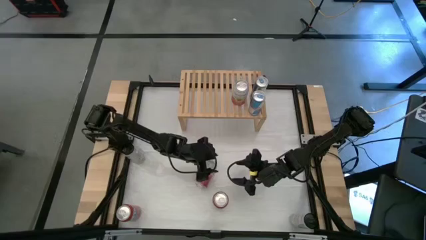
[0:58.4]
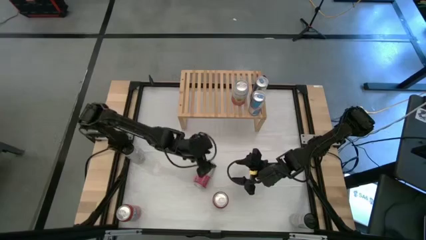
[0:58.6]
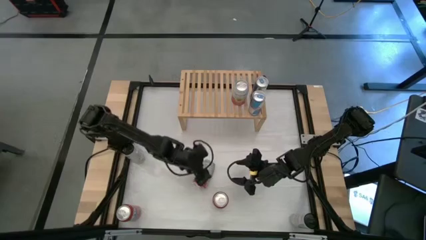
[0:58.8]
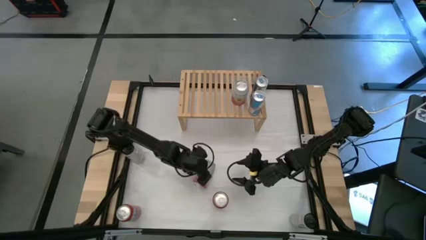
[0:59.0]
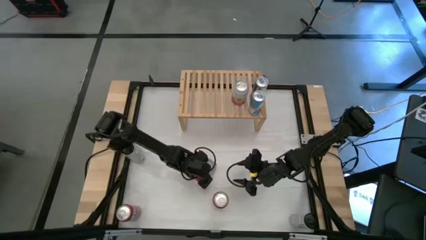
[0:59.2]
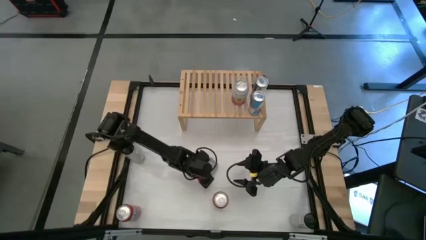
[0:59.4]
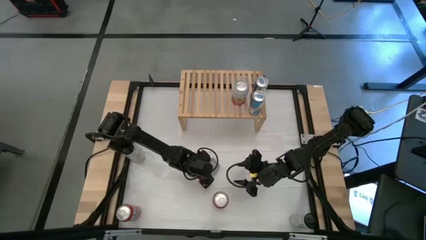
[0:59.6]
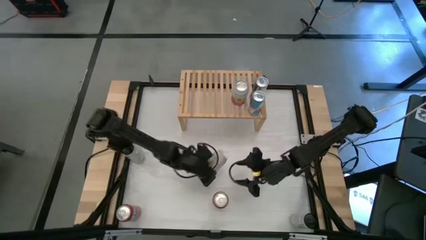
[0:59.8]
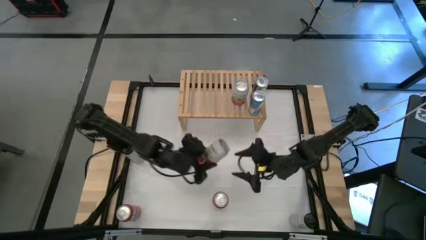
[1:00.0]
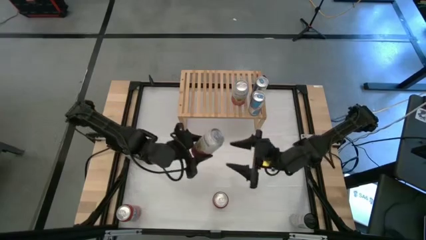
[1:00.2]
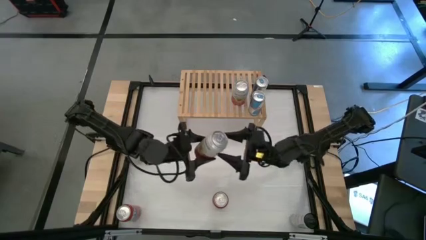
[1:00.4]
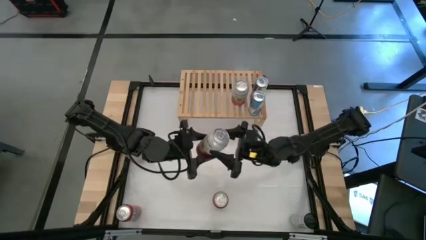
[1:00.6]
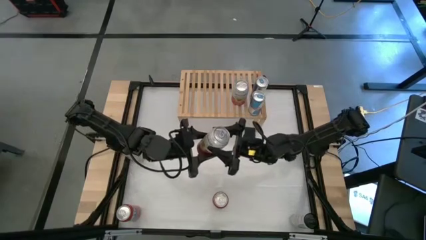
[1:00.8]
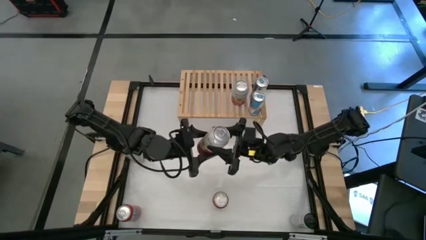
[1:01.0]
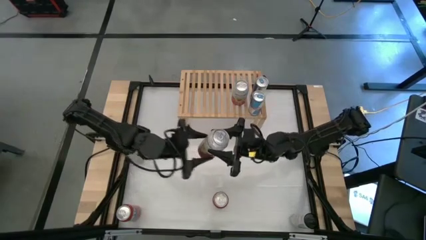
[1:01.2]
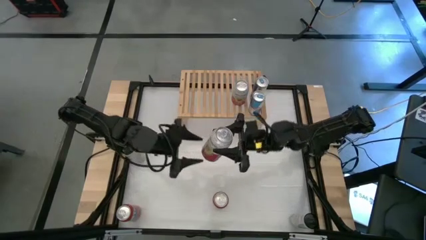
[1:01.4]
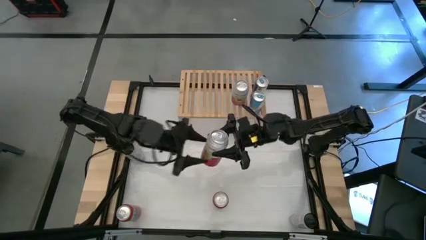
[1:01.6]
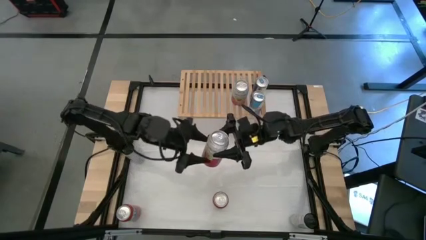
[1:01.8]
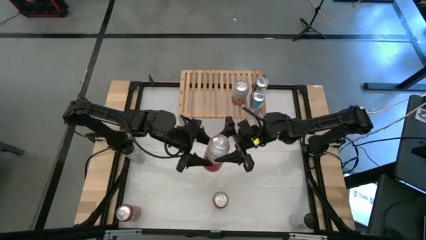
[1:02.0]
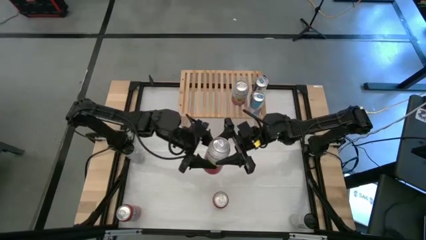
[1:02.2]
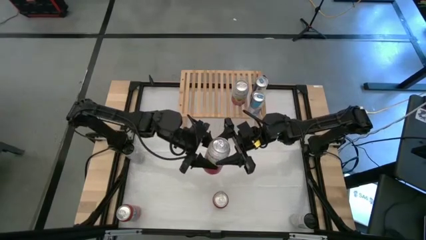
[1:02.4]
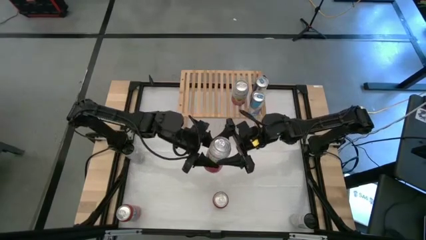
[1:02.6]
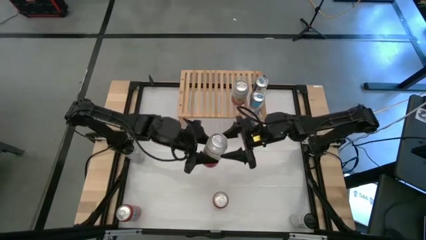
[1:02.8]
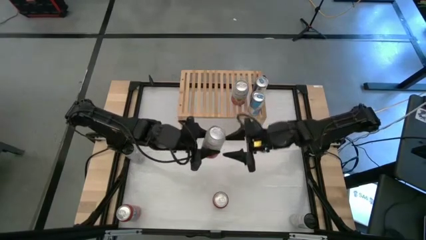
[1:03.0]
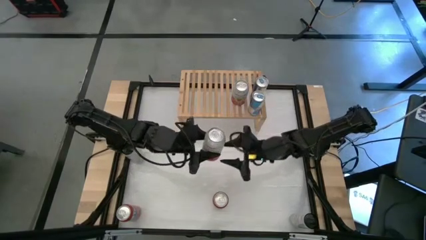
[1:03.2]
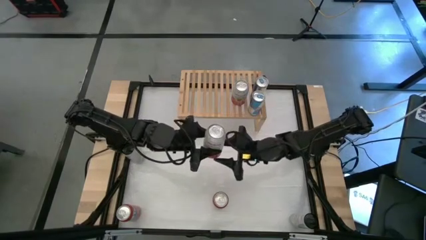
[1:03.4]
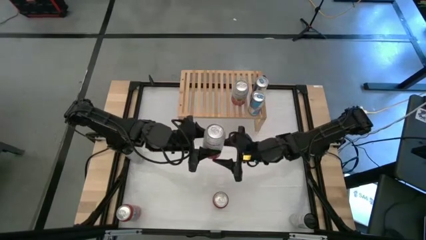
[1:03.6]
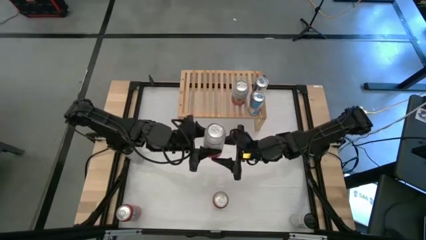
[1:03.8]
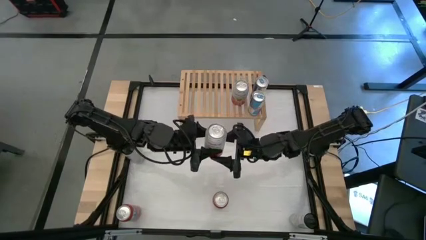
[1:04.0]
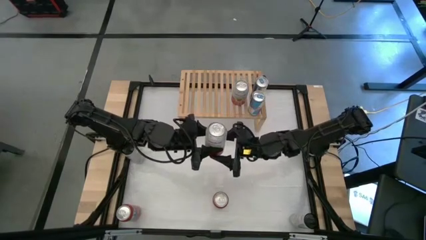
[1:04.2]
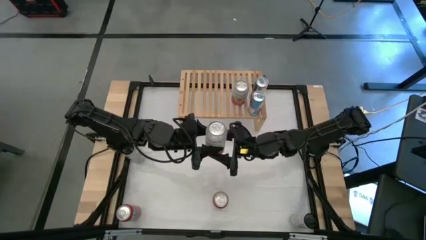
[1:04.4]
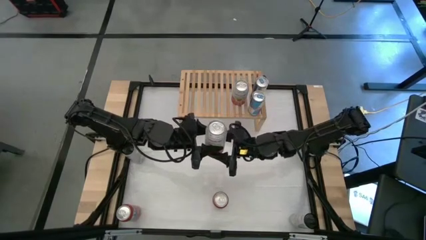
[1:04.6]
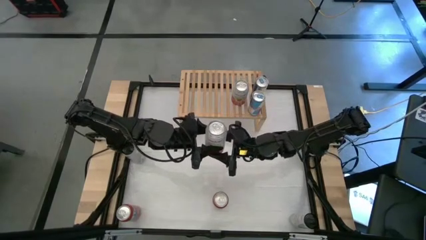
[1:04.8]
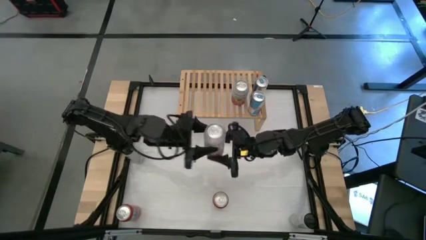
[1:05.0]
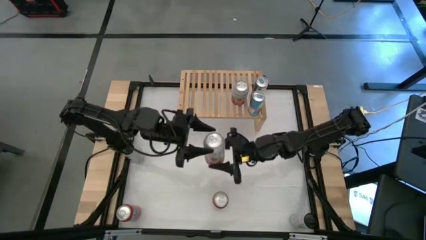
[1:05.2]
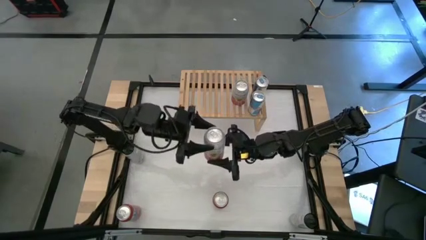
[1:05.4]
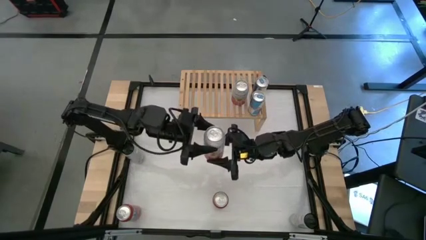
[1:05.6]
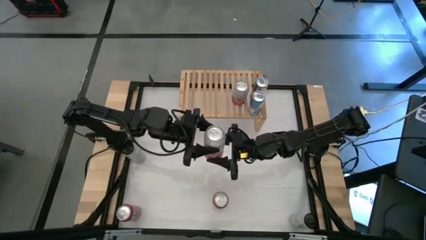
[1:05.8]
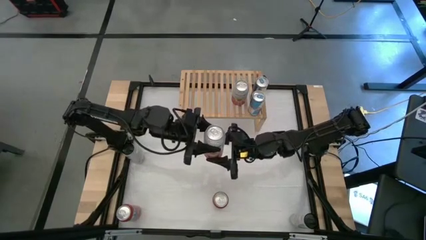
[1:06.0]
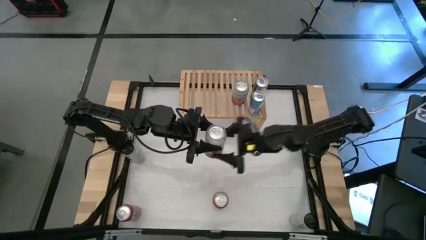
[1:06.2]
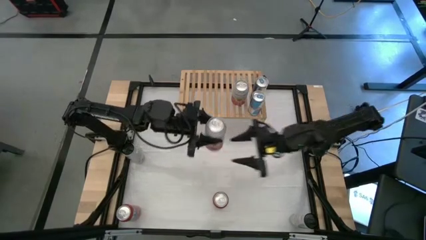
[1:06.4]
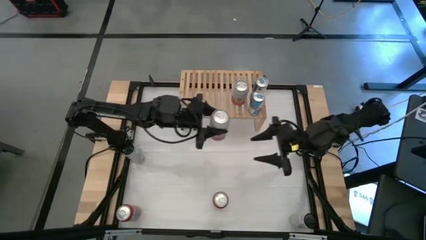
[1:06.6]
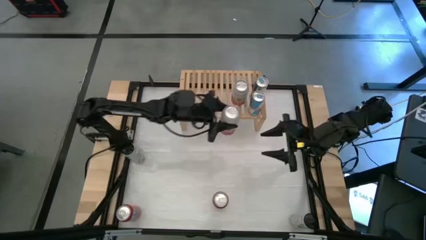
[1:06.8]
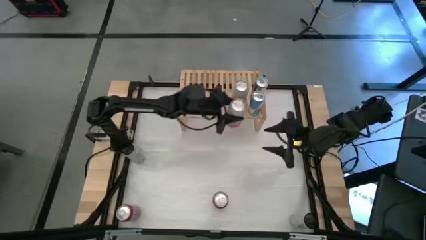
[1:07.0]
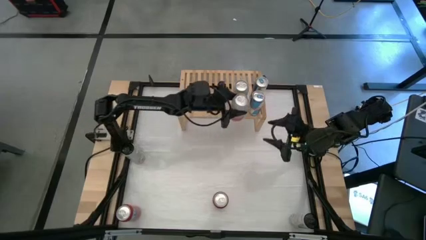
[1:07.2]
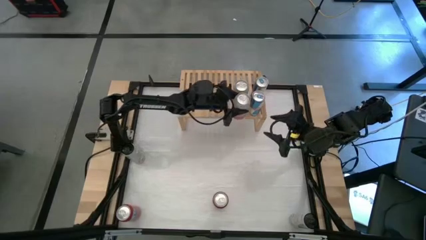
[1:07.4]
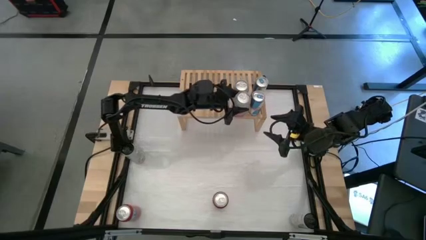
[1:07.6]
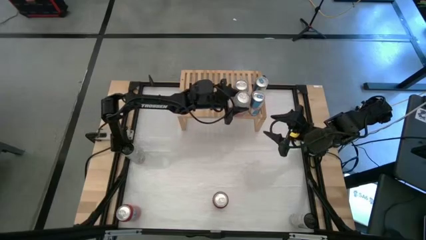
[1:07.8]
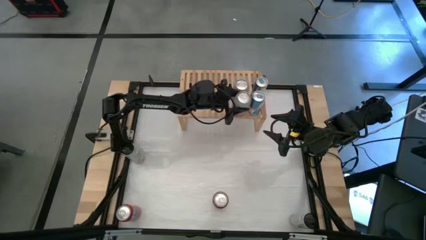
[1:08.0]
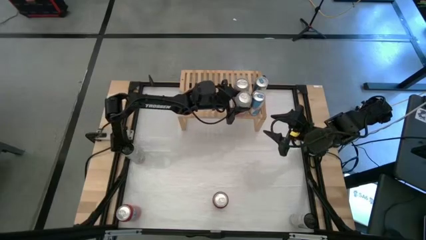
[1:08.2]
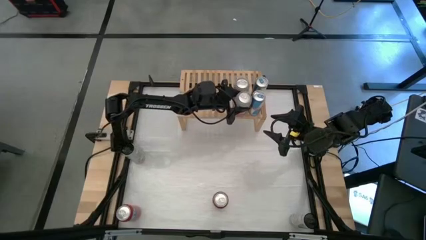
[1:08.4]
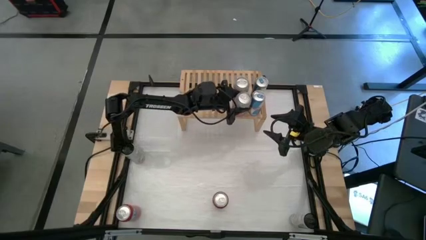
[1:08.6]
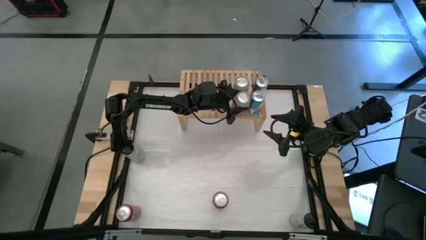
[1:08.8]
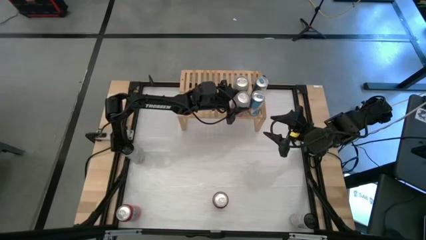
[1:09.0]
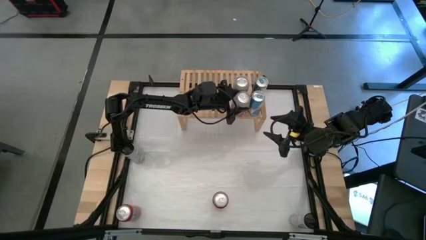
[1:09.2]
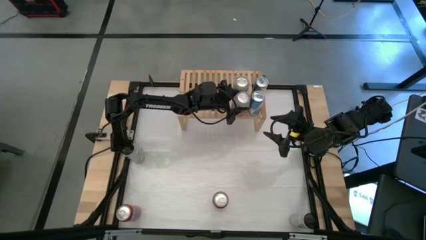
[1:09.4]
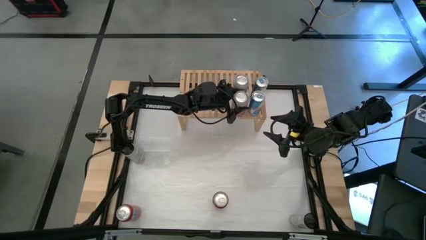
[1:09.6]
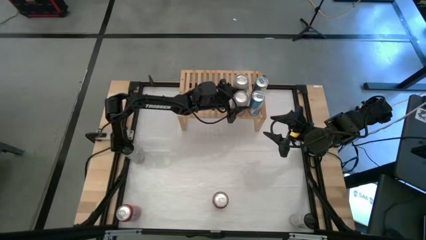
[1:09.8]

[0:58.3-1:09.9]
Task: Place canned beverage on shelf
Put the pink soda can on the shelf aligned with the other pink soda can

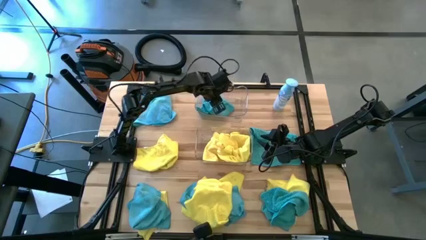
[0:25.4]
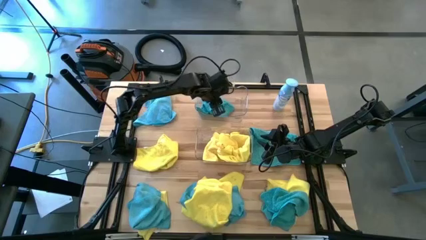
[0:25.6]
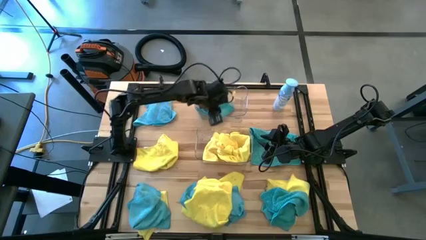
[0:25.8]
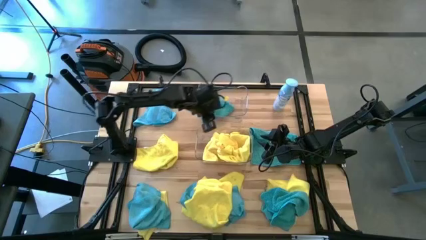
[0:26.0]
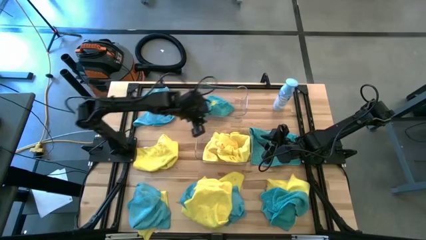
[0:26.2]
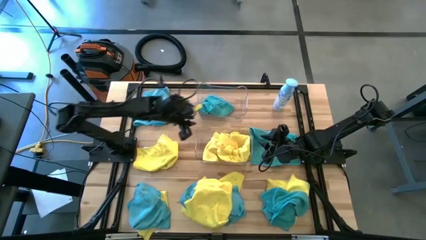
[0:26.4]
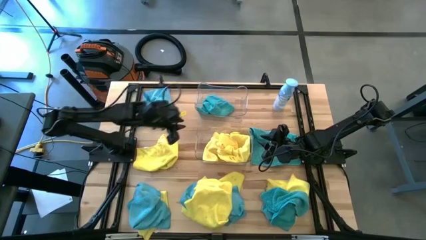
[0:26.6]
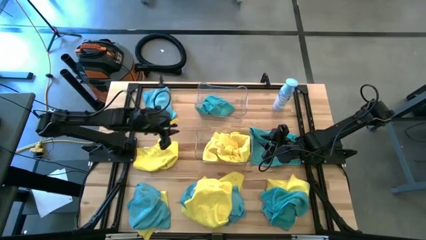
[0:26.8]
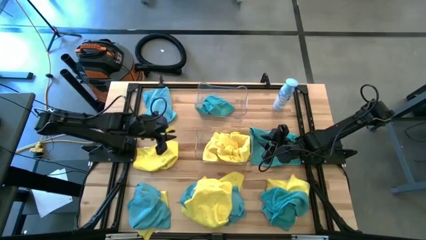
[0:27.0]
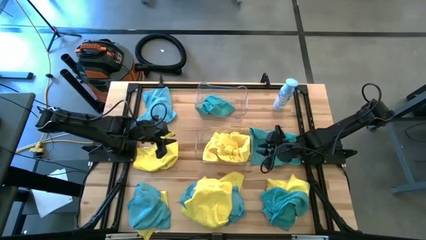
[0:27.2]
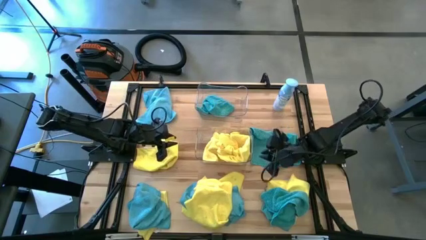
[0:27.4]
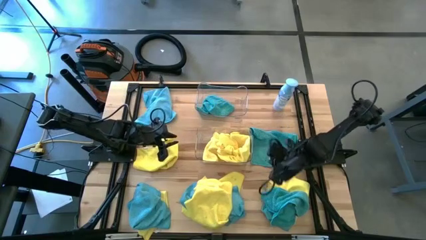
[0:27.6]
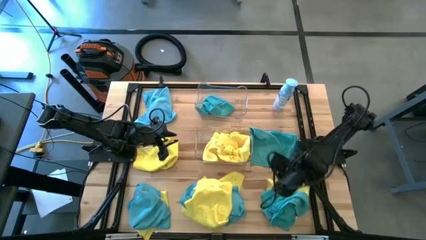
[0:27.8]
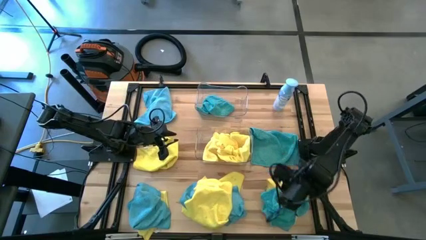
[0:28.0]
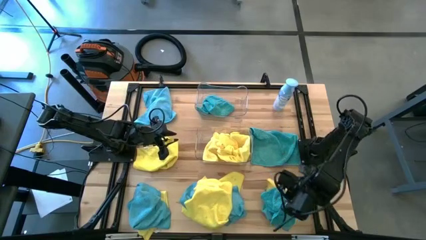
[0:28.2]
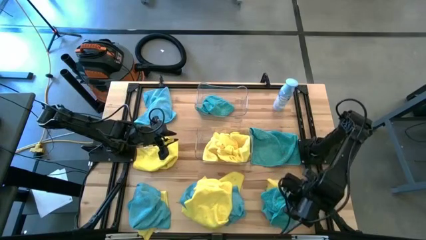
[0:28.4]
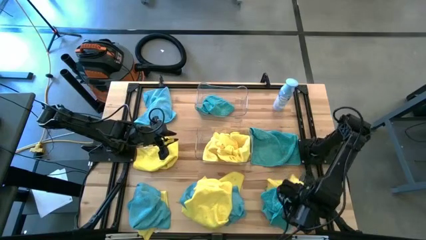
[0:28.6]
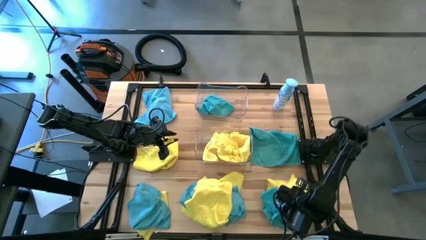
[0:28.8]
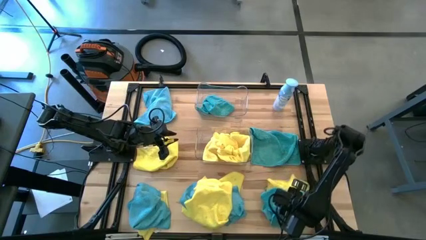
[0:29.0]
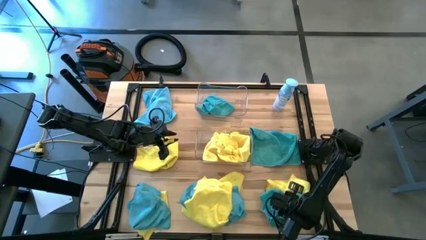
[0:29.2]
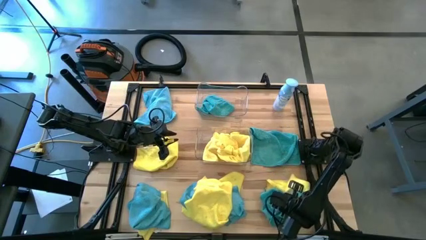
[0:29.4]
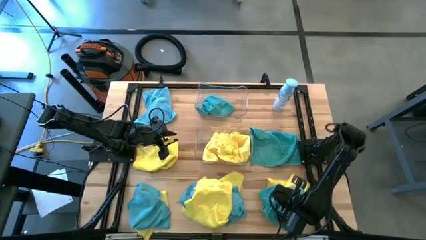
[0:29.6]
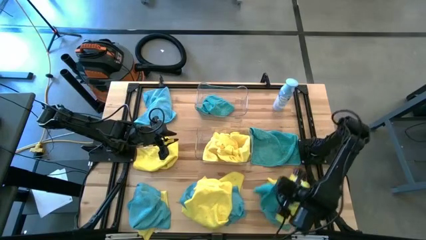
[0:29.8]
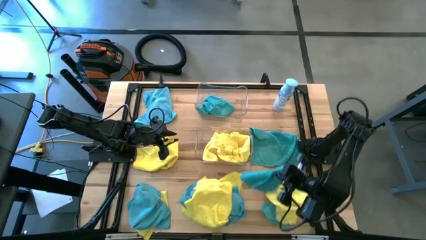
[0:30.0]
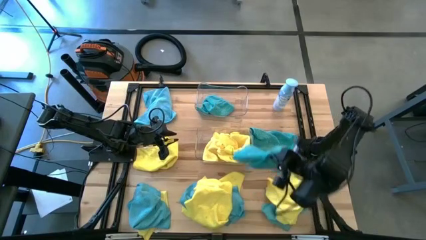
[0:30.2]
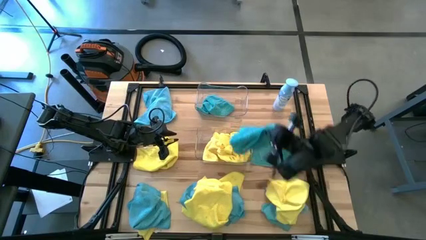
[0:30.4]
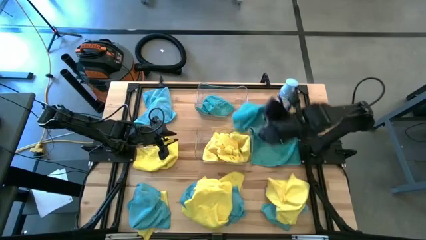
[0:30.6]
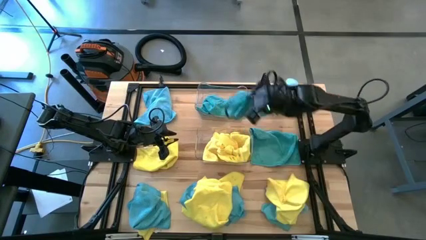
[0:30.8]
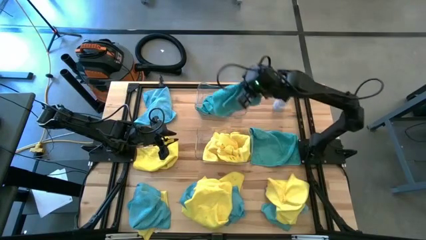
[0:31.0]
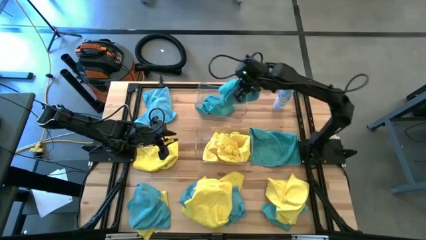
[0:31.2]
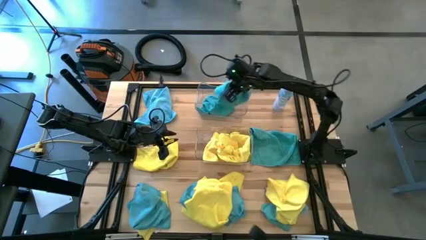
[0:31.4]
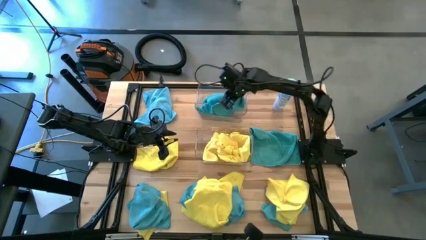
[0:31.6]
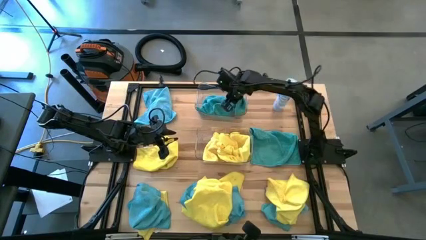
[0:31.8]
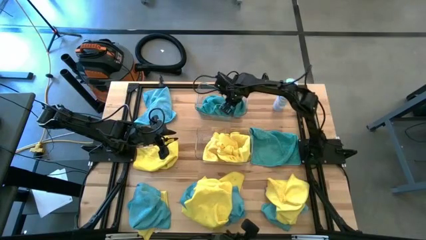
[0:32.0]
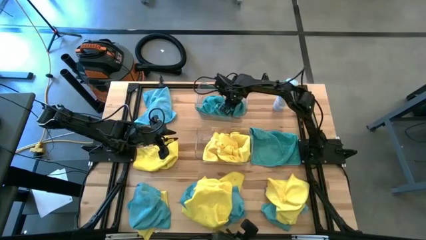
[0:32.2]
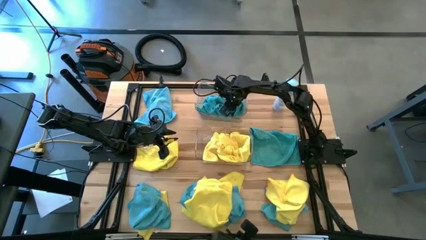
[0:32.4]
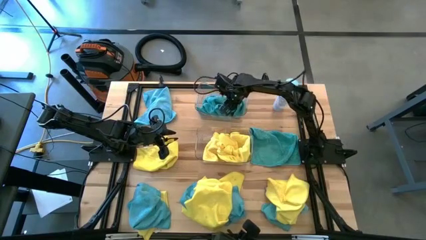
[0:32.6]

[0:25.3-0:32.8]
Task: Sort microfiber towel by color & place in baskets
Put the blue towel into the top transparent bin
